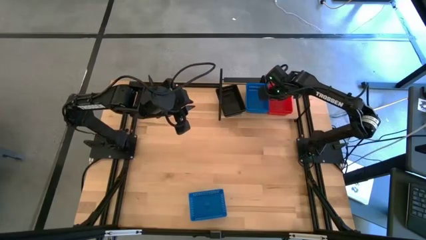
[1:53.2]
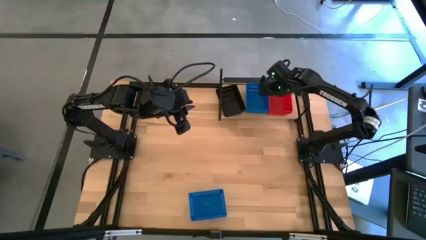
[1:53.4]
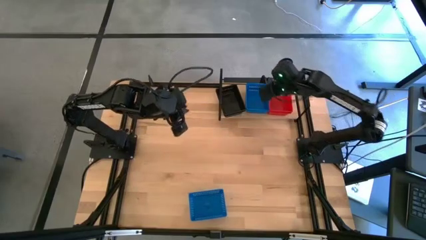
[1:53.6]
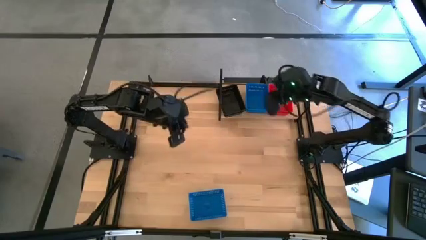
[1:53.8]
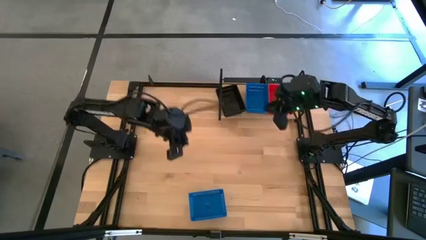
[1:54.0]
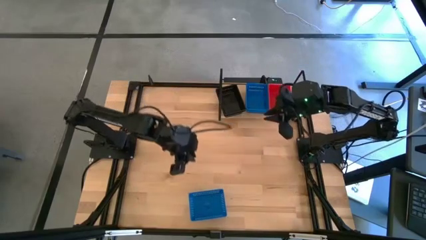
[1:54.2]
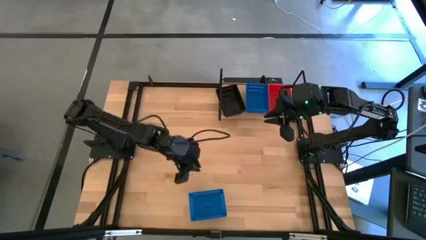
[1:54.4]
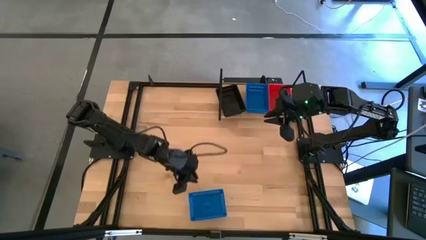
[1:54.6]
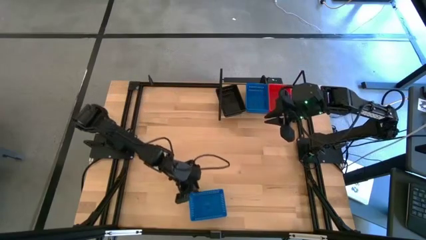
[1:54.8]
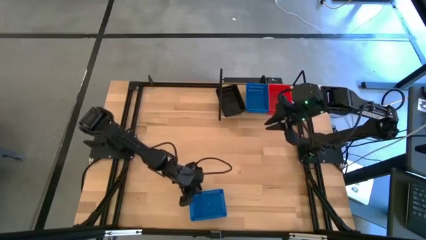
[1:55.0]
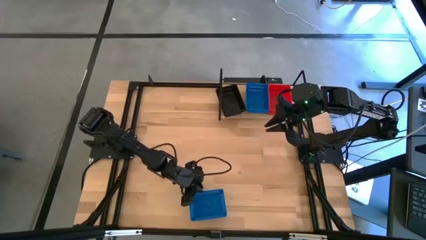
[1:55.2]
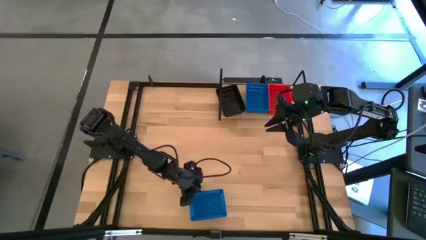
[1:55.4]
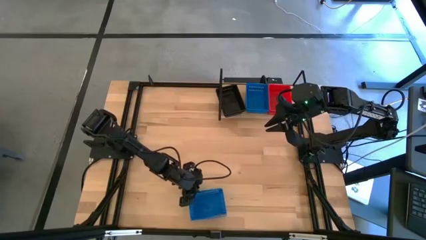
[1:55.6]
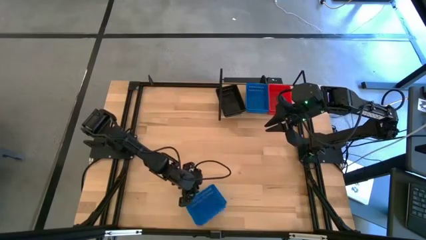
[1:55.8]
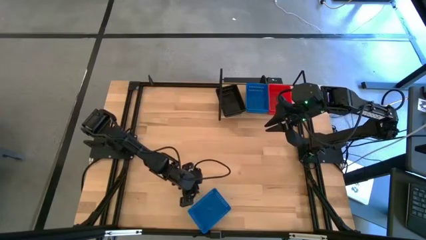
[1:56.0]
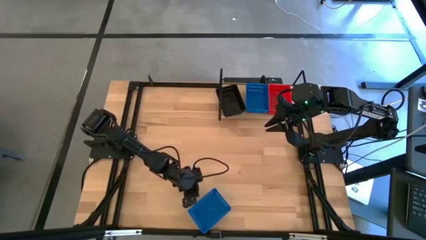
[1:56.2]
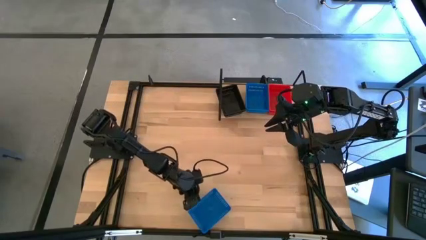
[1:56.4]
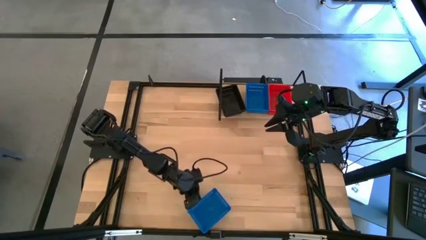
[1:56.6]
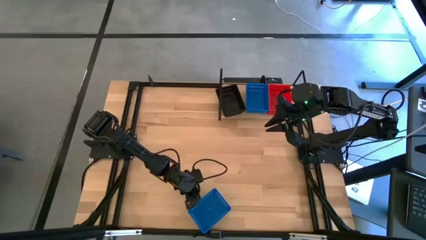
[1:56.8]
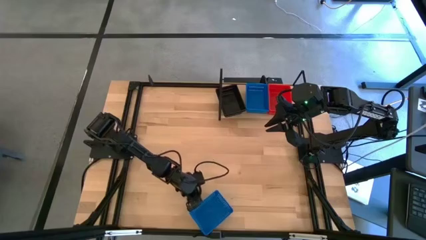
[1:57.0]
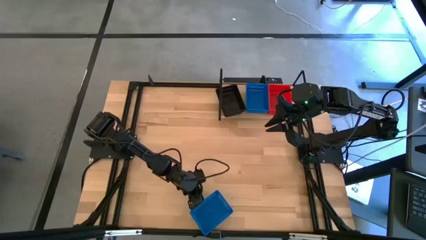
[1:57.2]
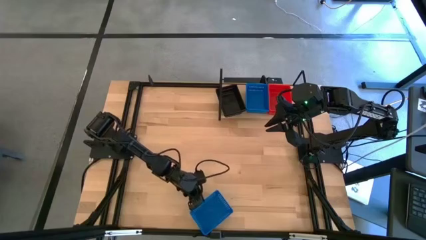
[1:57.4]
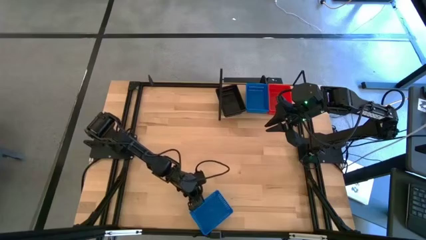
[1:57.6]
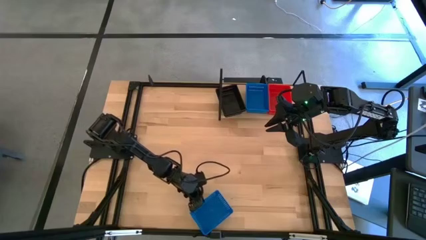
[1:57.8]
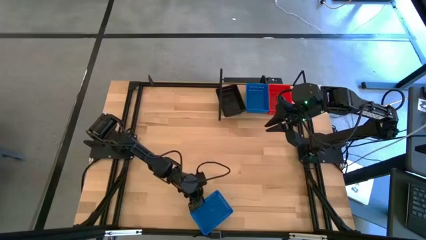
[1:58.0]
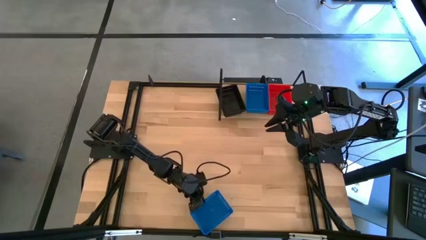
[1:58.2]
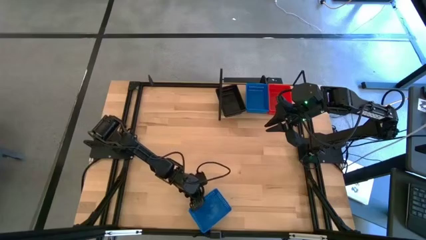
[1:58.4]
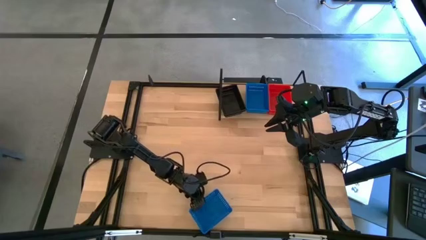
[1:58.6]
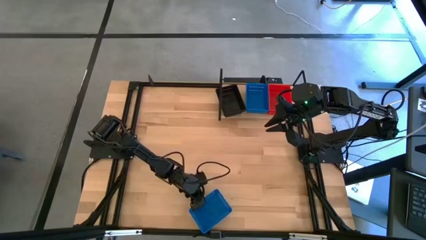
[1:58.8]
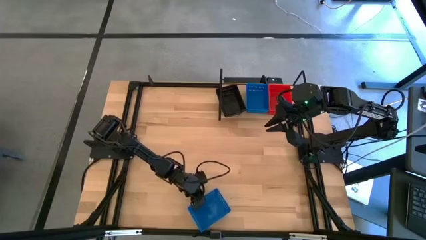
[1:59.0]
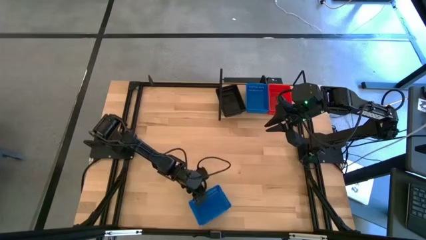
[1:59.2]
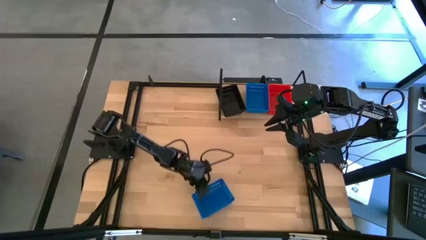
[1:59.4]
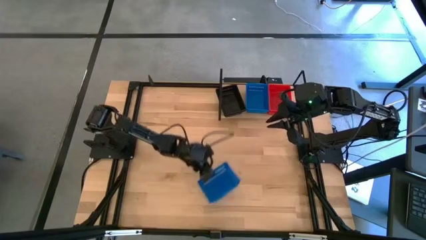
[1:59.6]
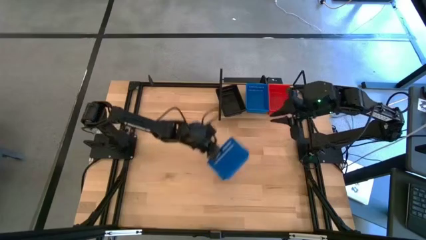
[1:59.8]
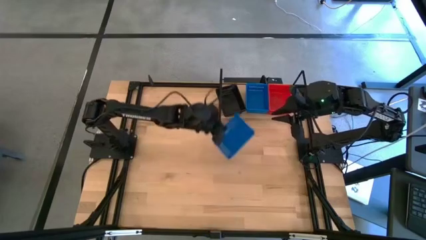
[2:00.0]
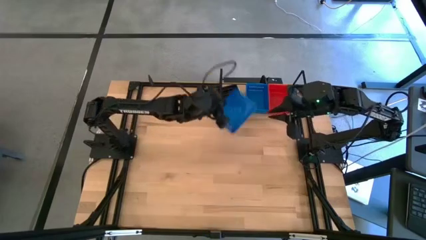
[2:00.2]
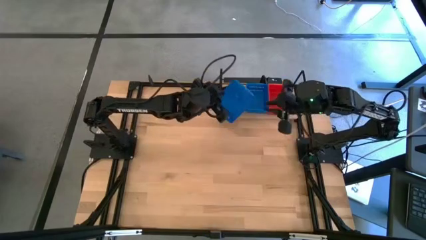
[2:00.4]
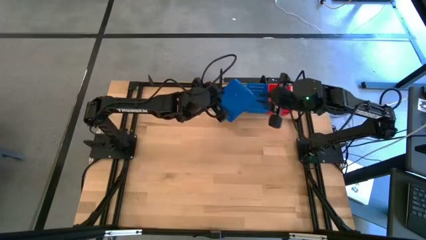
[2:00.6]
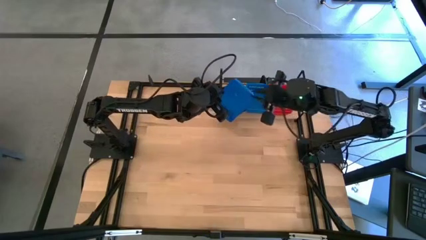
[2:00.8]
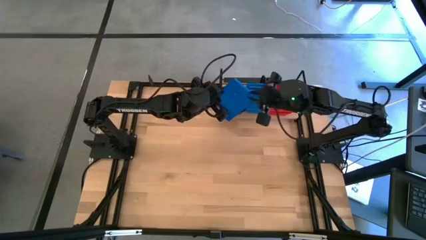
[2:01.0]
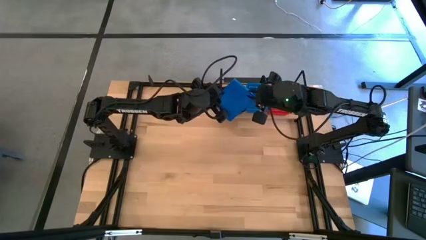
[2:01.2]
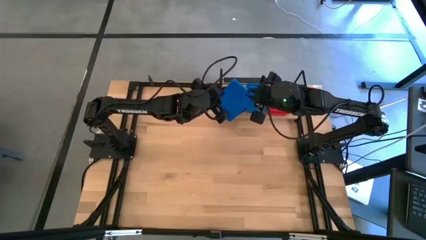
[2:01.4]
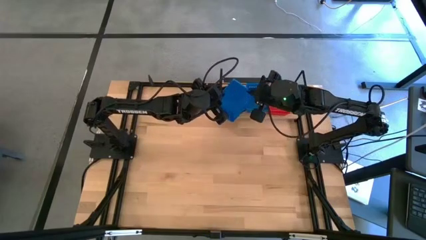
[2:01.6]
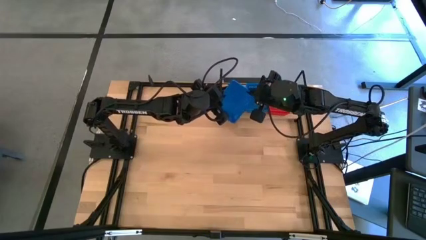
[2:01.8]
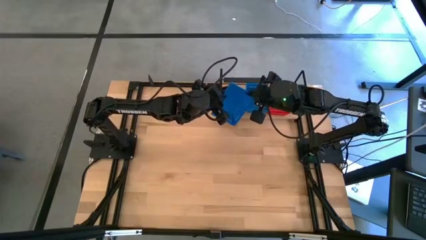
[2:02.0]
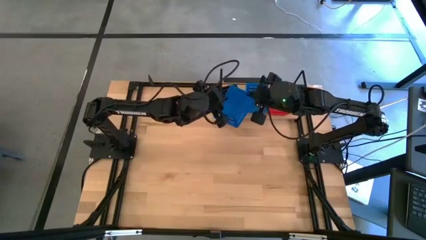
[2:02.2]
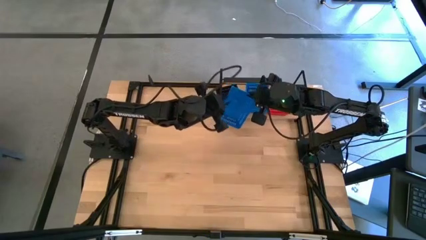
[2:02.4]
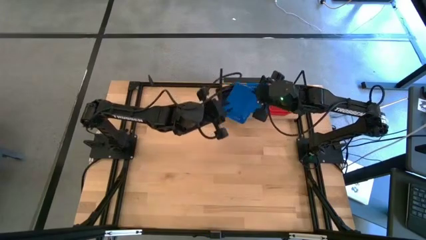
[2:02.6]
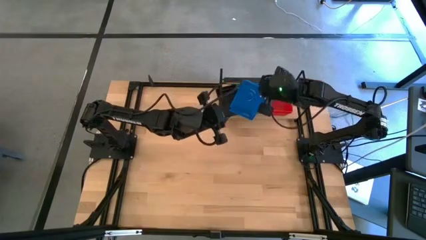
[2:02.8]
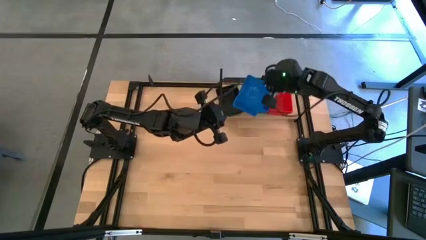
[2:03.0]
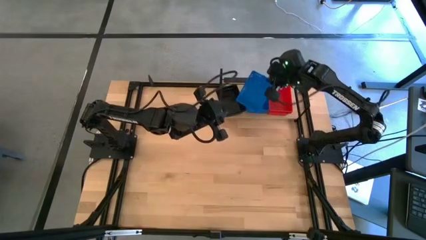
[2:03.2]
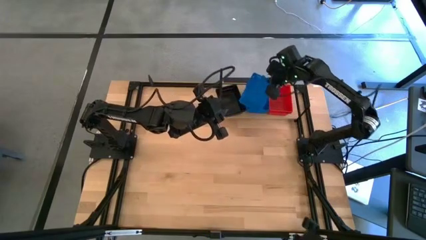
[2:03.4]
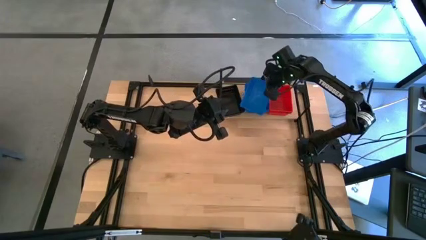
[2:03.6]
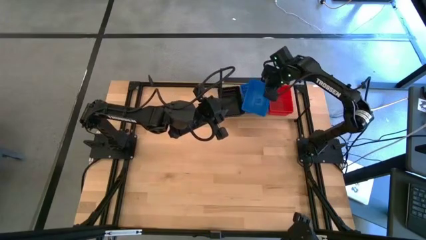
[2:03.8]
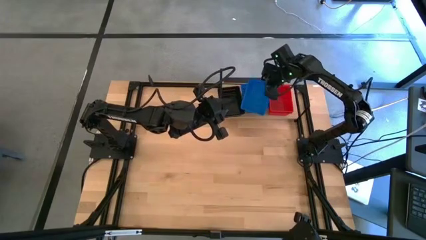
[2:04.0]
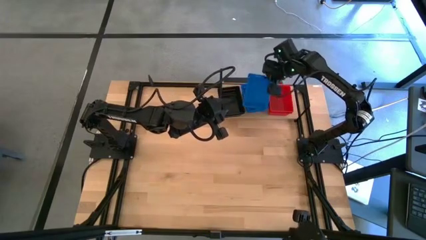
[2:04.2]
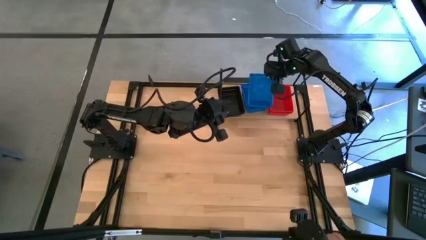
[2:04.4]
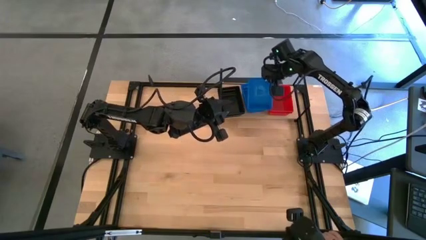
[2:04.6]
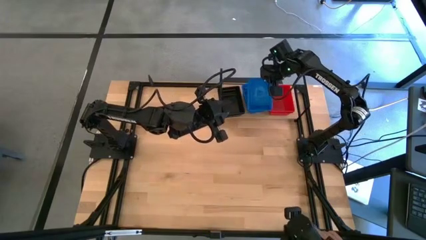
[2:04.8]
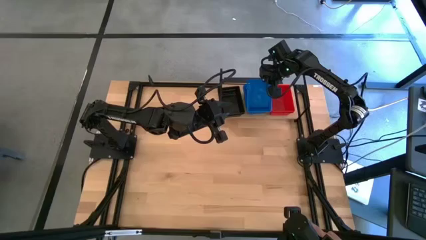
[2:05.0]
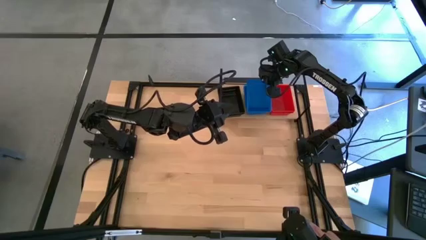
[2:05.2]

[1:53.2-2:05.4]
Task: Stack baskets on shelf by color
Stack the blue bin on top of the other stacked blue bin on the shelf

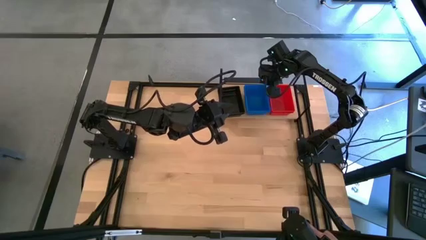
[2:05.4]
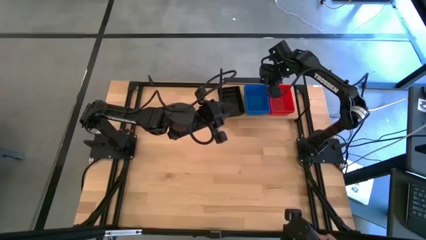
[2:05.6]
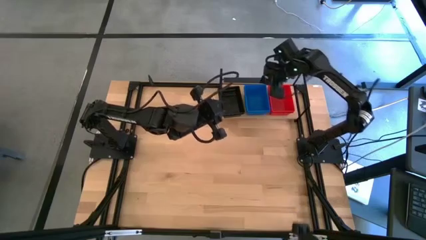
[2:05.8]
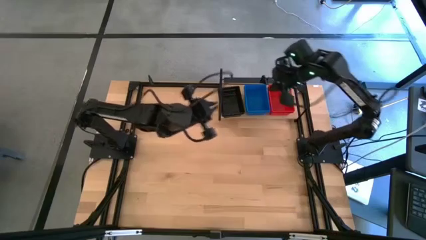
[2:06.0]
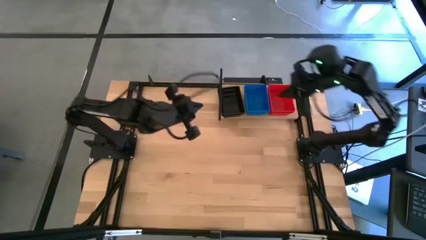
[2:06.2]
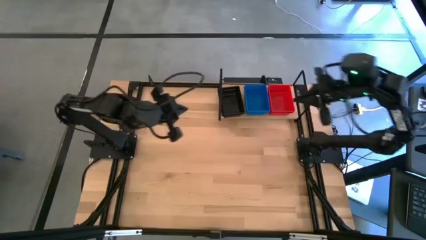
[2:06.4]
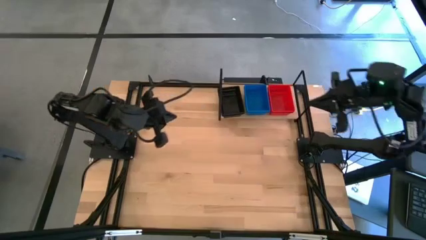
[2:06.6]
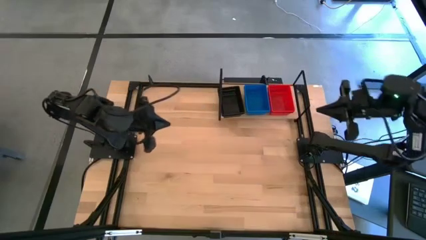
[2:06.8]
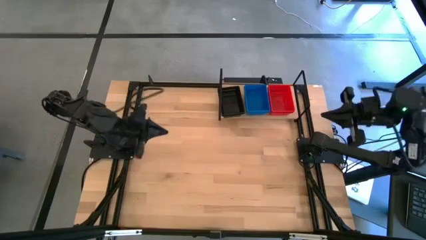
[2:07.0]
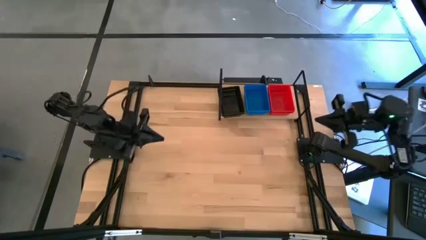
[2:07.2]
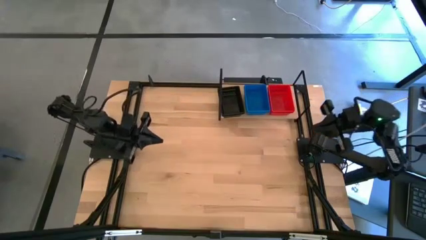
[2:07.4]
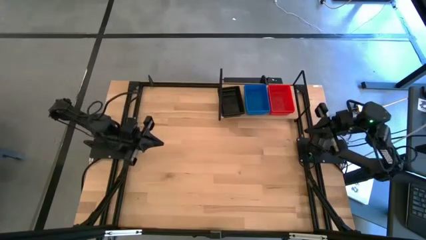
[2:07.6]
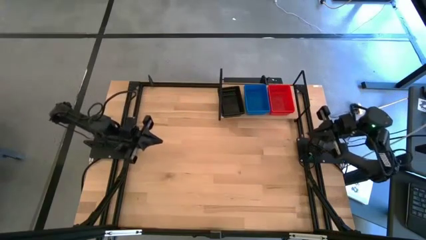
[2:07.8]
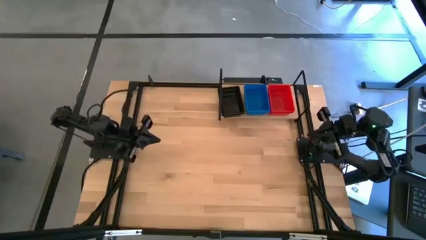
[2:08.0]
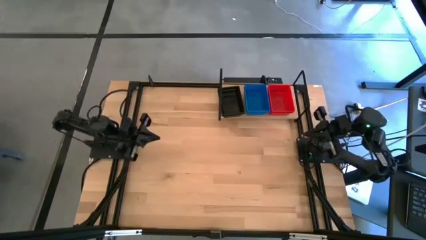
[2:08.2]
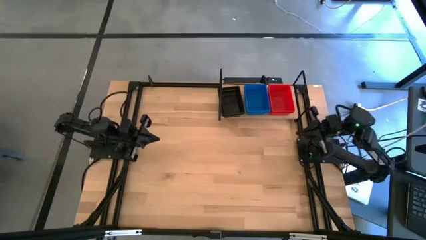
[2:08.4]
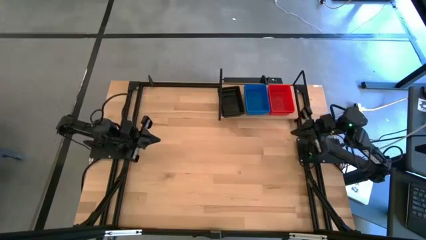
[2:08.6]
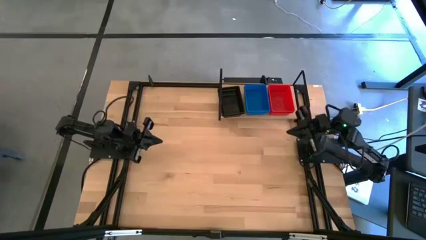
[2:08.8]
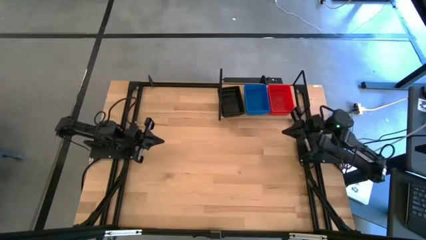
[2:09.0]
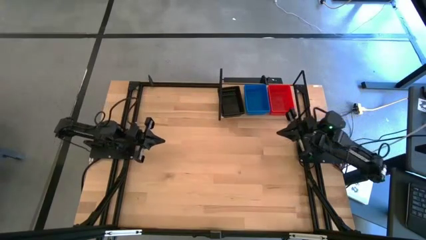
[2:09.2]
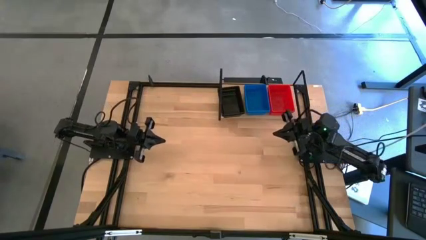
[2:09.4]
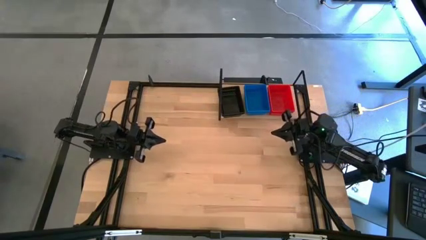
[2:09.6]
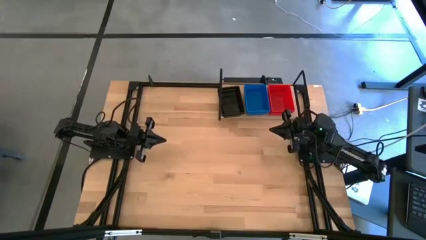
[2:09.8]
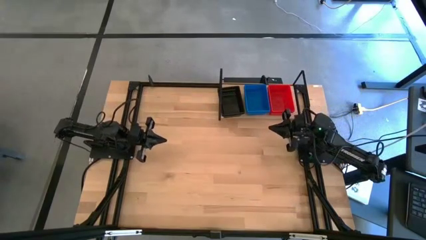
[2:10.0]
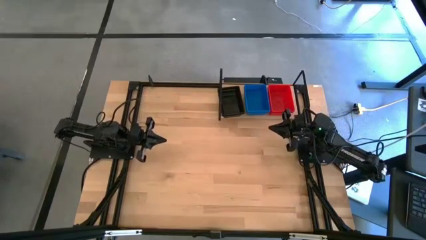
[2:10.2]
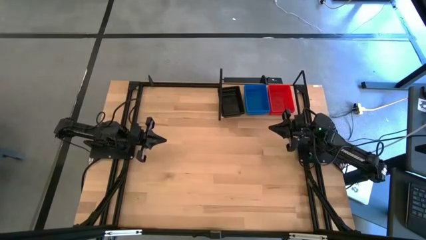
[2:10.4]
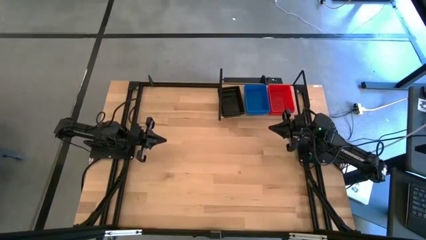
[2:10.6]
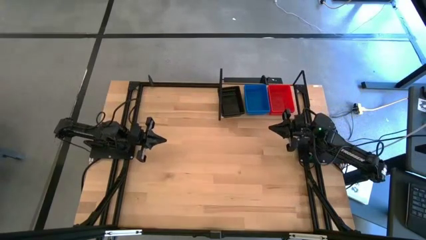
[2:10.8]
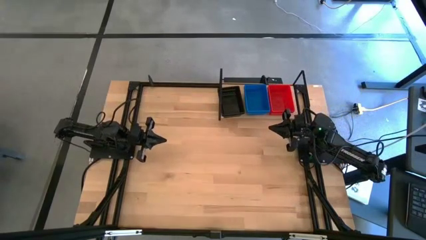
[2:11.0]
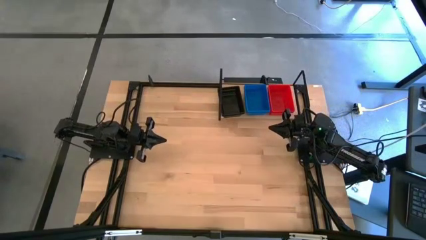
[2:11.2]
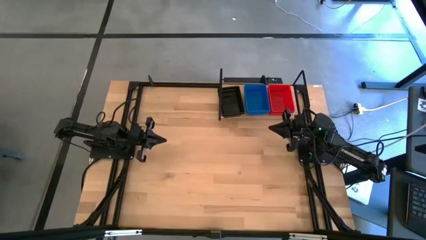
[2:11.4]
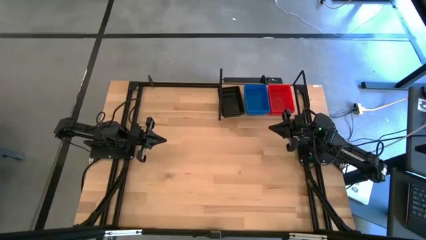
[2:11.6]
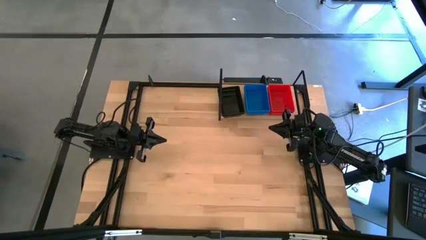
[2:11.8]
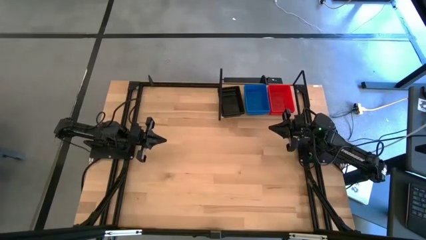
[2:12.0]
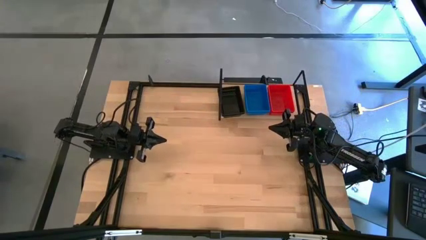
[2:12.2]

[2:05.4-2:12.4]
Return to Home Position
